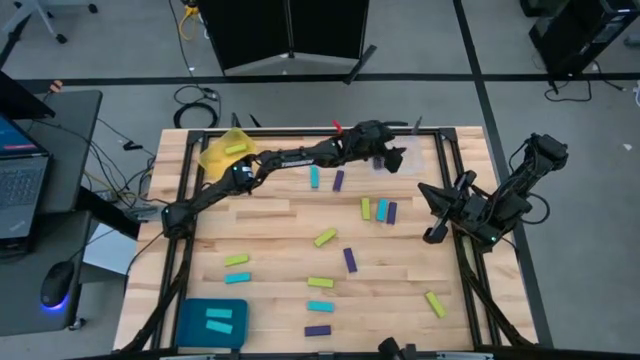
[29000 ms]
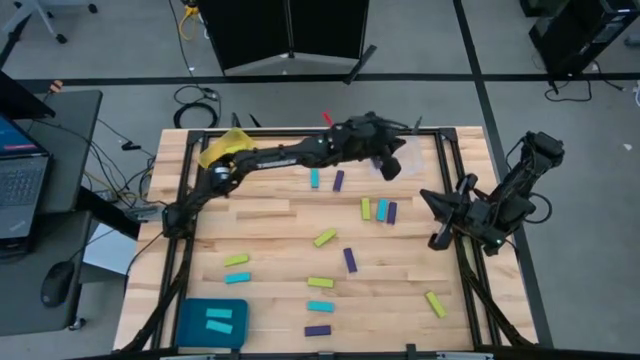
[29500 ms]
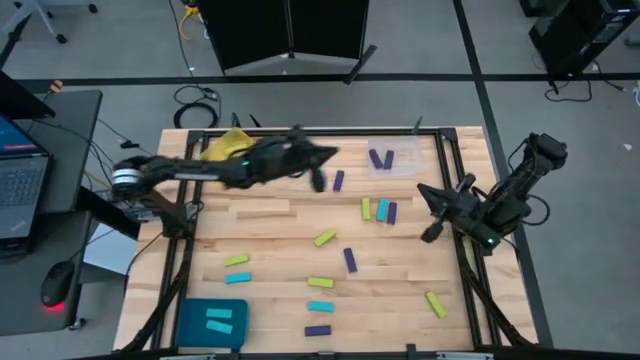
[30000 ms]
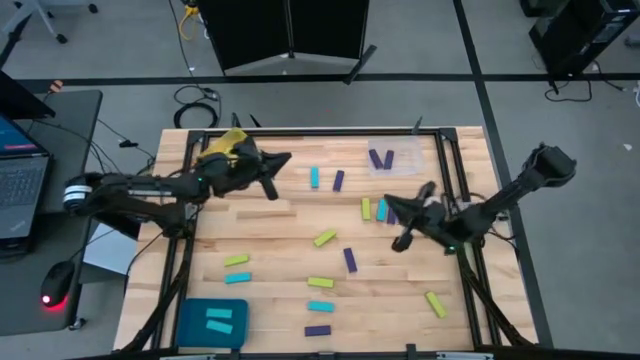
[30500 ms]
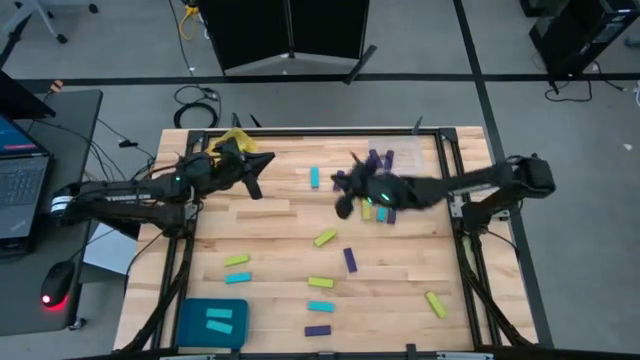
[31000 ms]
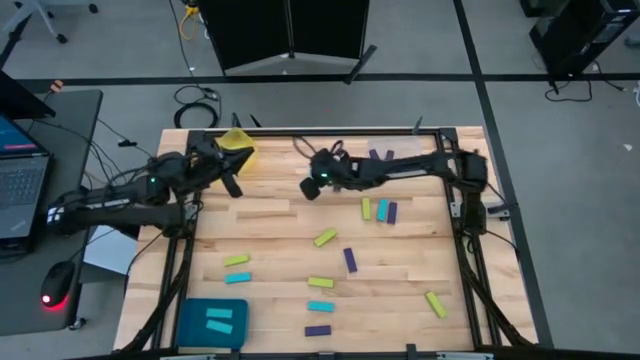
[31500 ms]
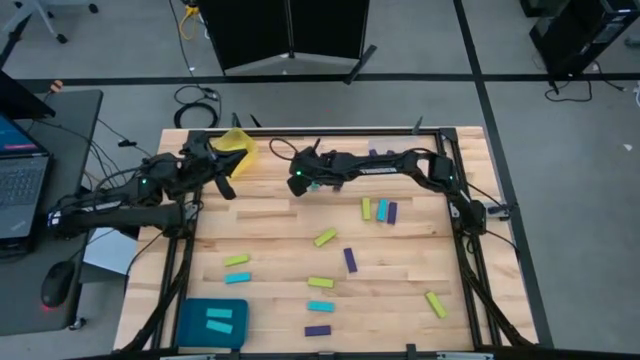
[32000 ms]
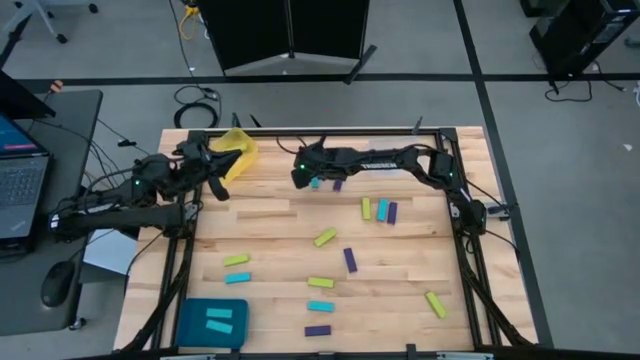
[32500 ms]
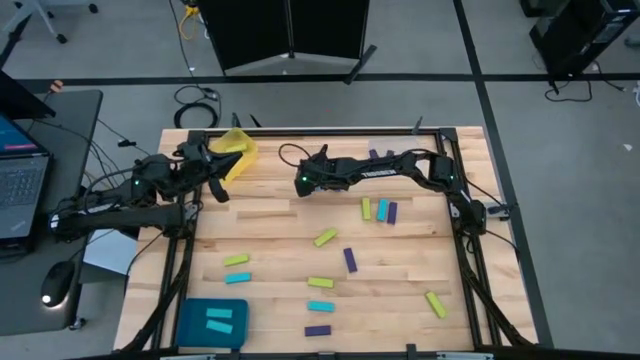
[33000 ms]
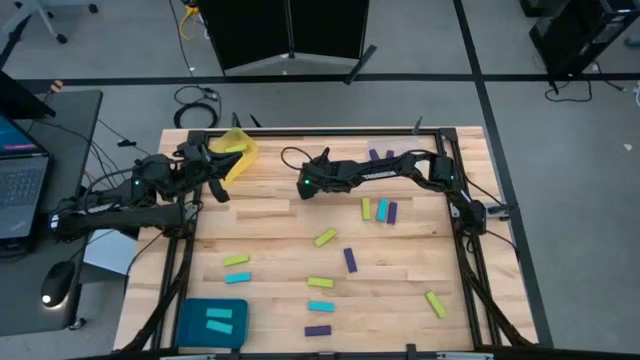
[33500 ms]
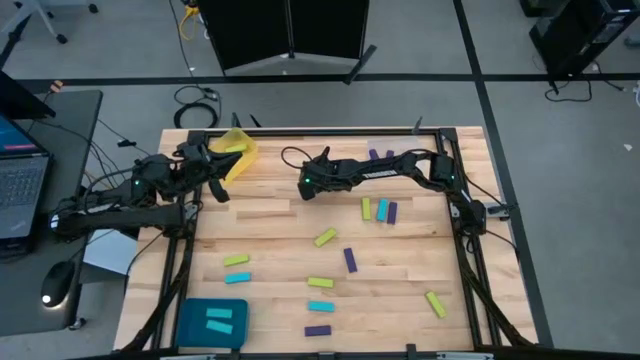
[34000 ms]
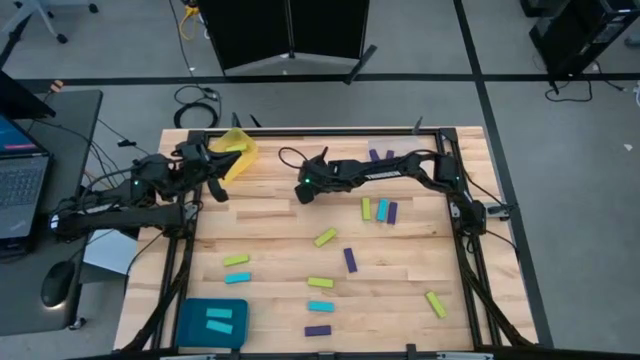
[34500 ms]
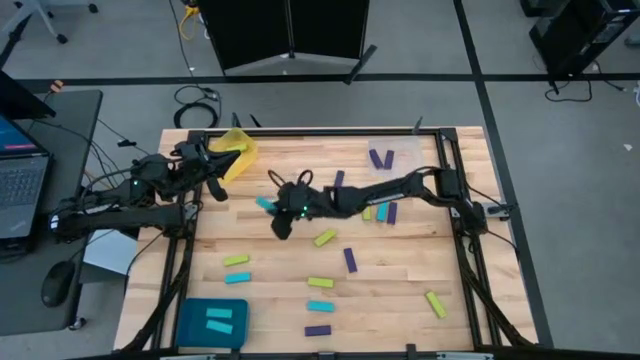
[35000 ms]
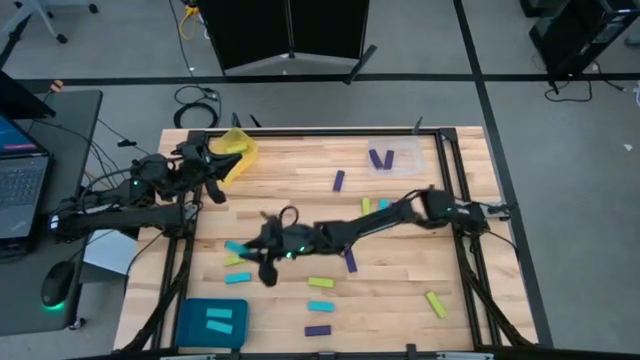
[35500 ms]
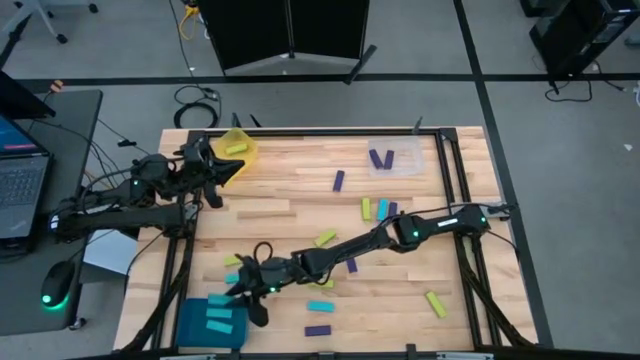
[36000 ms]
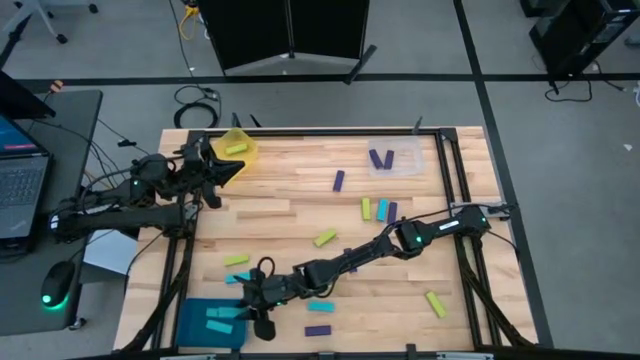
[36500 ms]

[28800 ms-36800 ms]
Task: Sort blocks
Put the light blue block into the blue bin

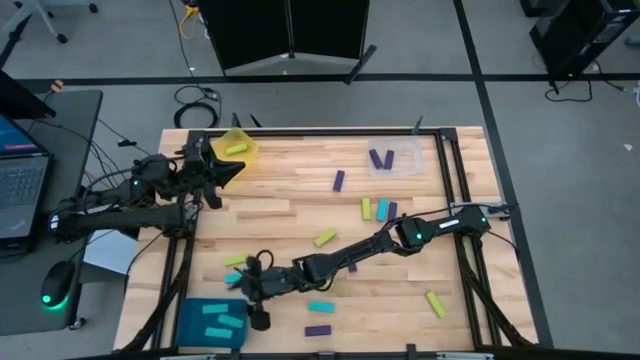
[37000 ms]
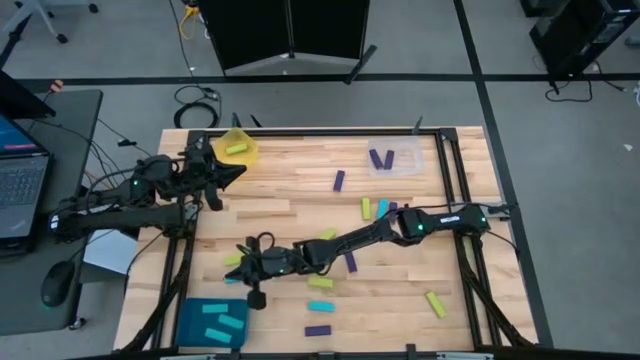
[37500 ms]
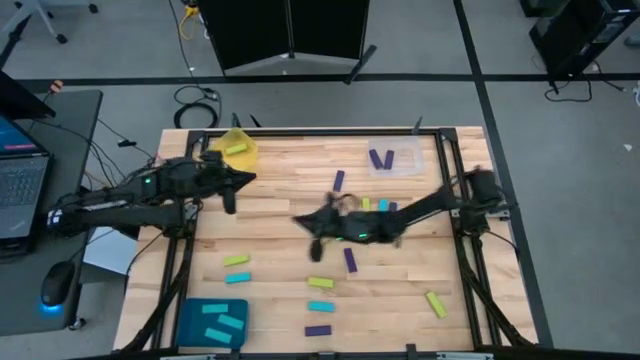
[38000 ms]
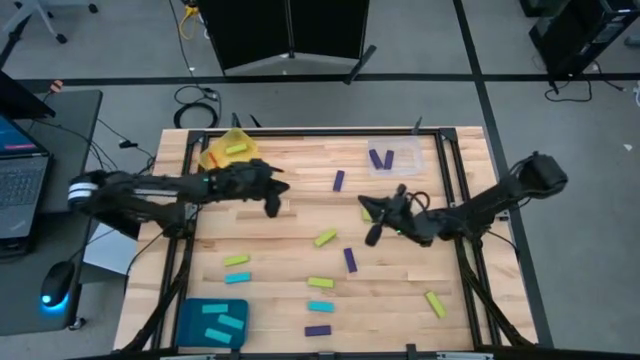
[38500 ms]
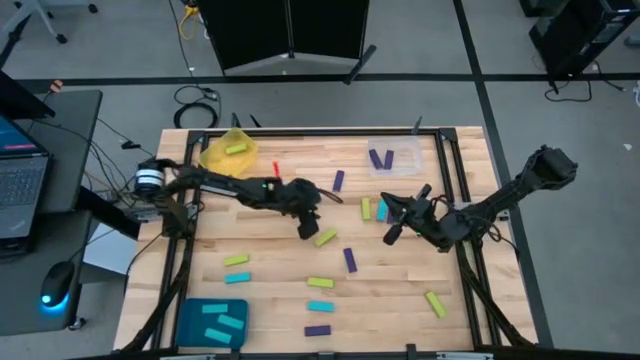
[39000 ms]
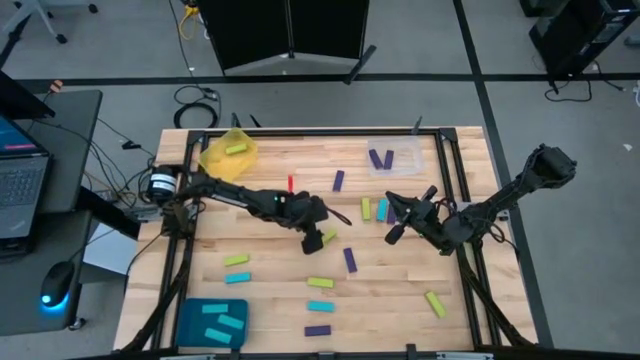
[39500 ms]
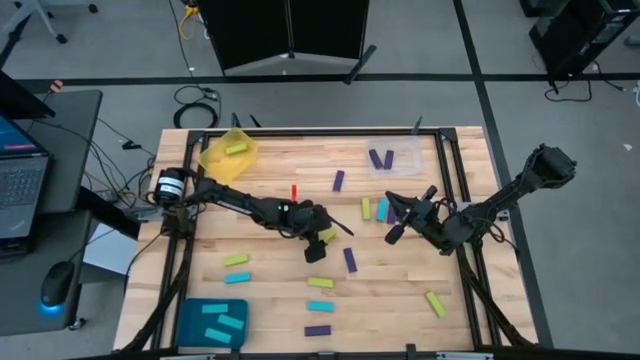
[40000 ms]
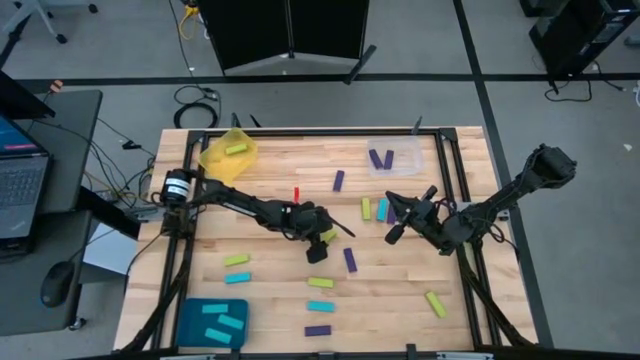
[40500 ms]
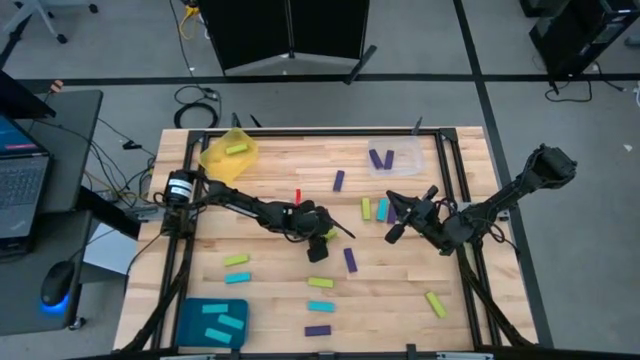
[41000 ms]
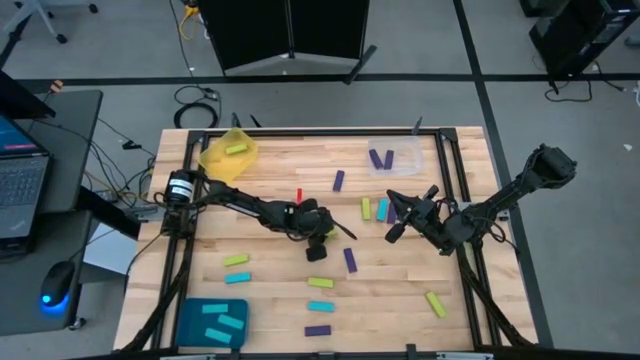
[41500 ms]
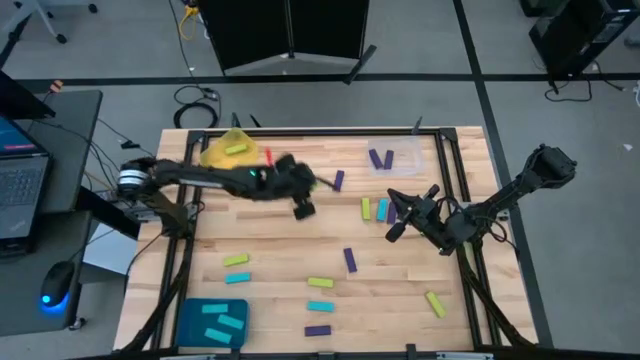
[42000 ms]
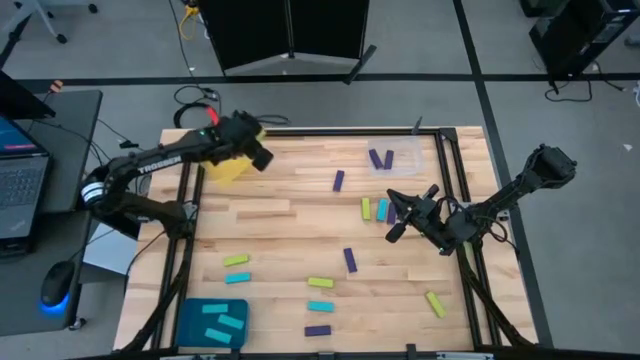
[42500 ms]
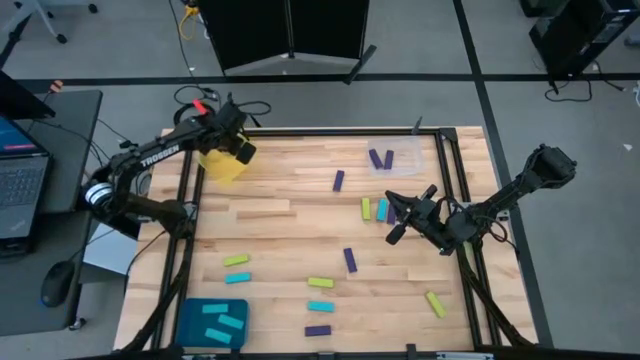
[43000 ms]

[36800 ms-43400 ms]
Put the light green block into the yellow transparent bin

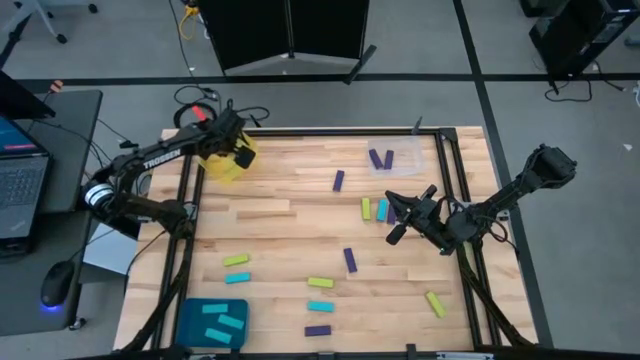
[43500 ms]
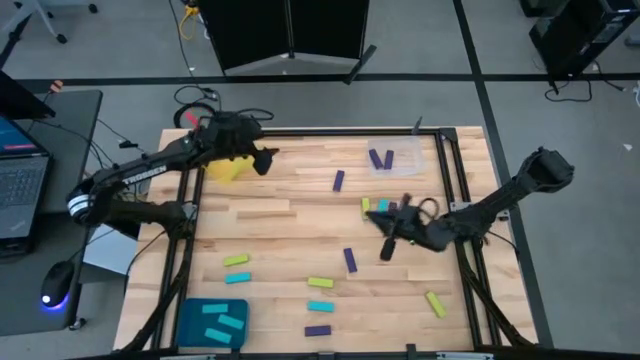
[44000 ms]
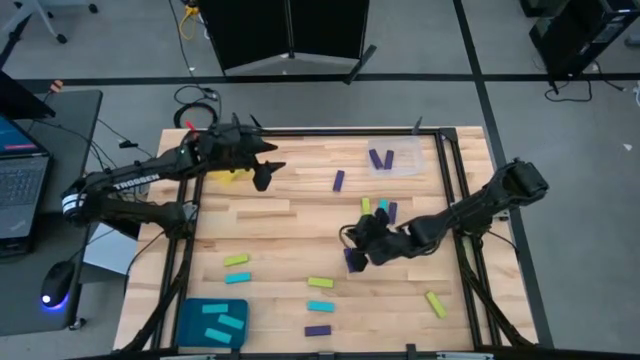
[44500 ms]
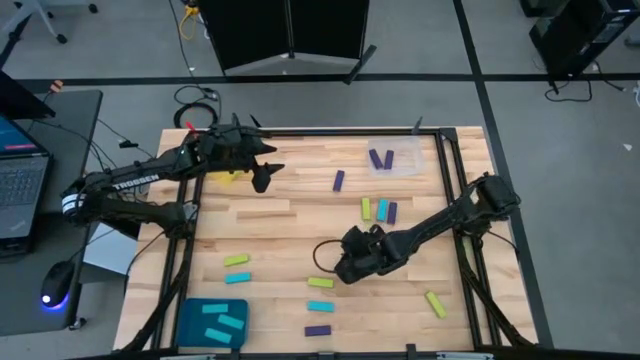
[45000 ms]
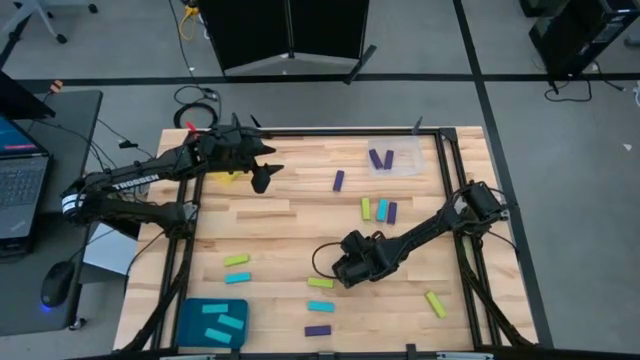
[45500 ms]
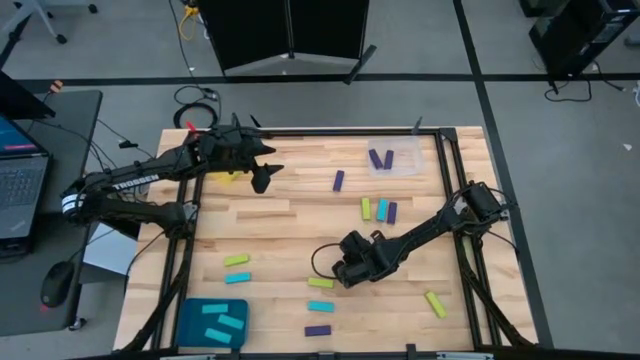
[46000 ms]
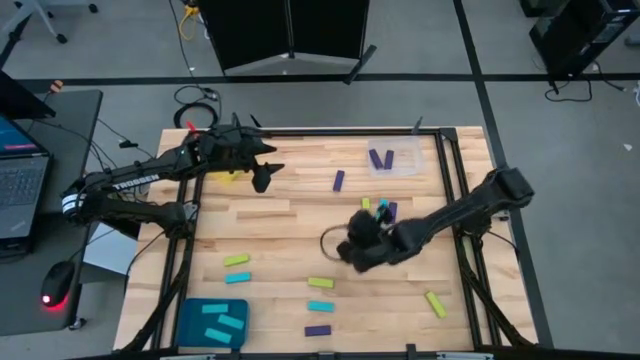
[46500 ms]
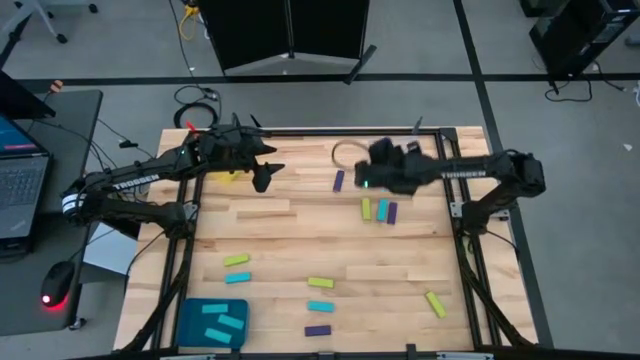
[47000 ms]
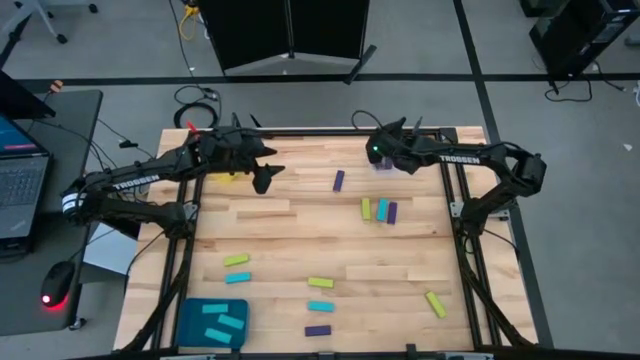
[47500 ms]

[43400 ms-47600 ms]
Put the purple block into the white transparent bin

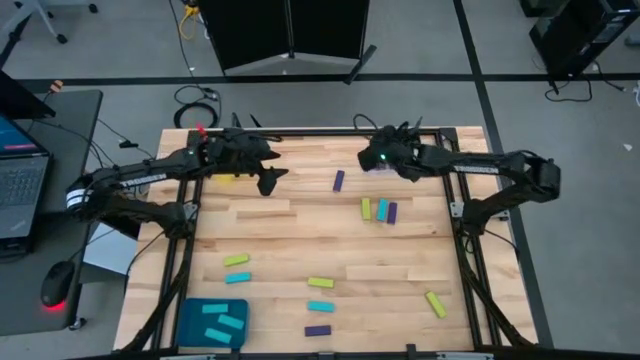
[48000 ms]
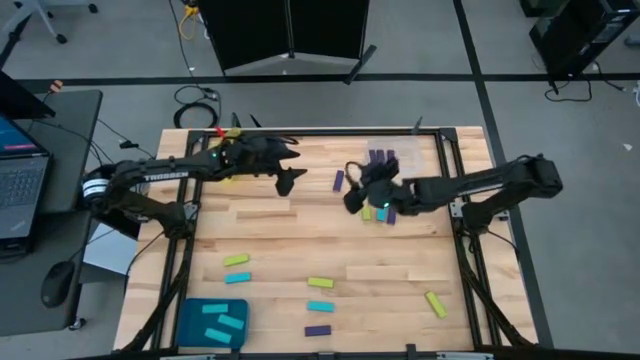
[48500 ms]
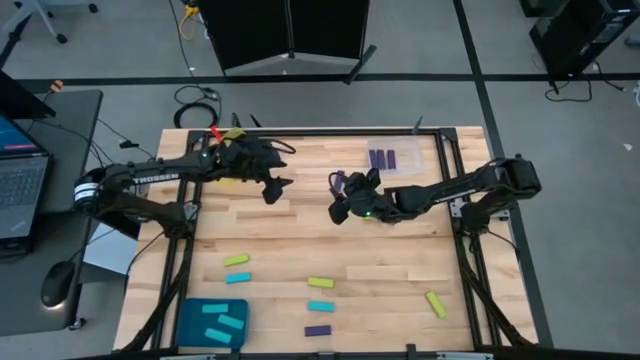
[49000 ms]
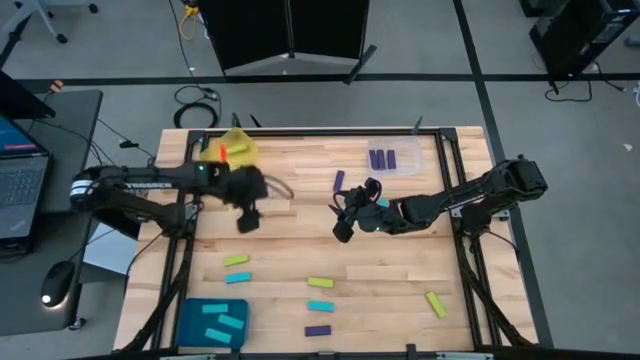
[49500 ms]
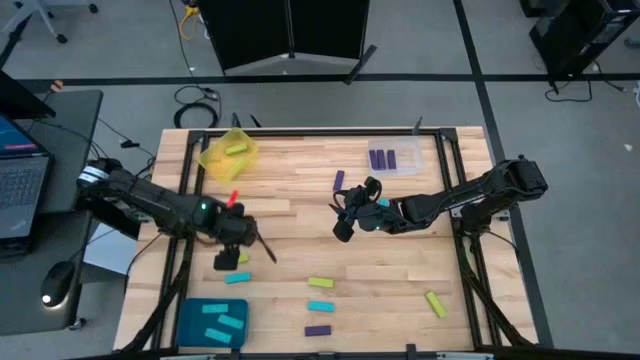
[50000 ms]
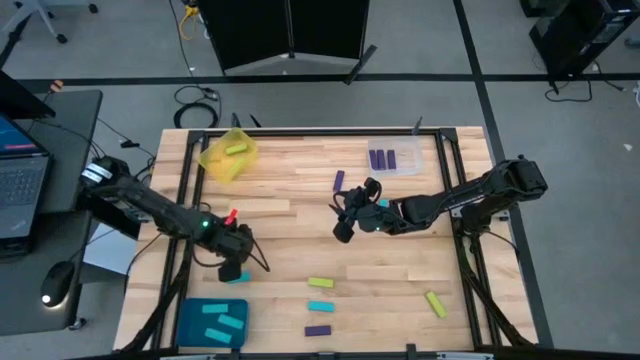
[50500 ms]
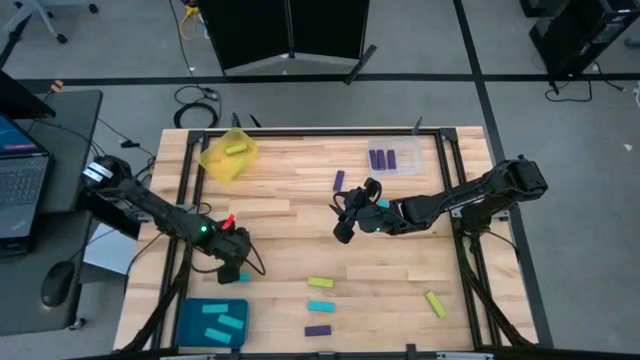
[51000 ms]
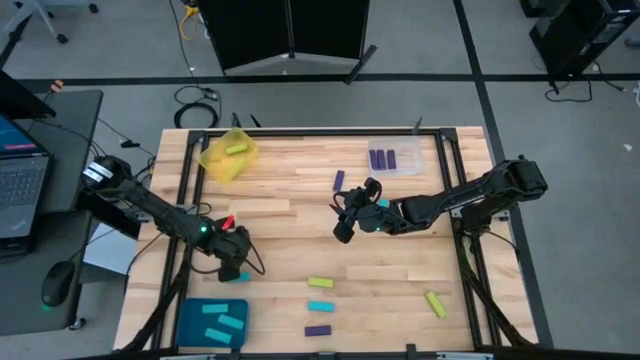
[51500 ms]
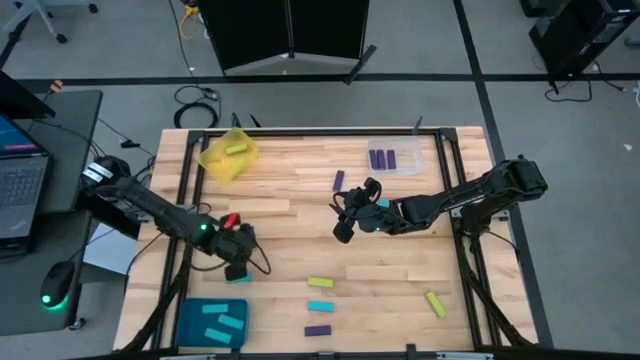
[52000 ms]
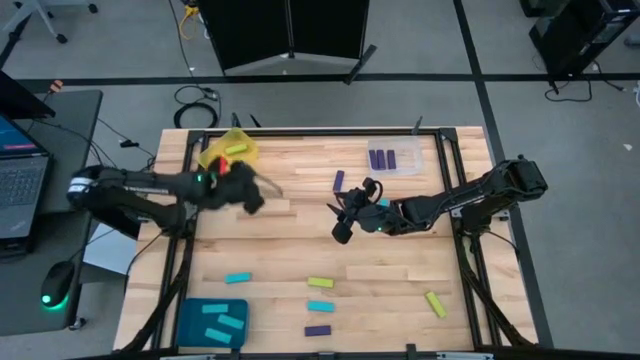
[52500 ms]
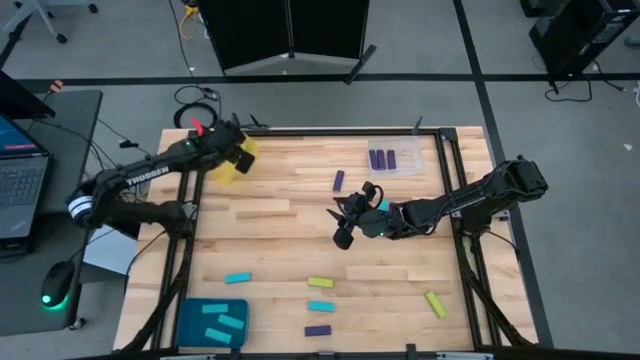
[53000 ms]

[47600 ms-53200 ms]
Put the light green block into the yellow transparent bin
